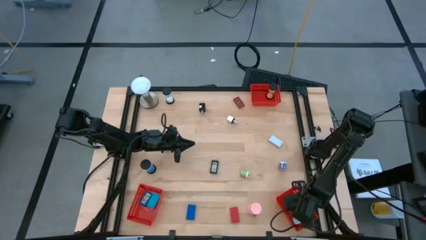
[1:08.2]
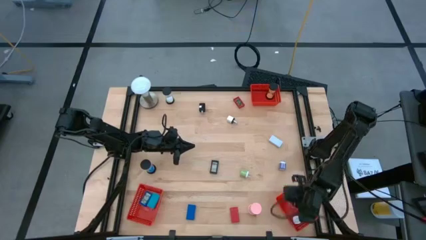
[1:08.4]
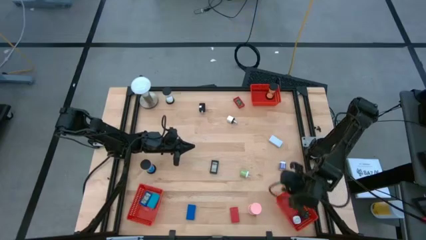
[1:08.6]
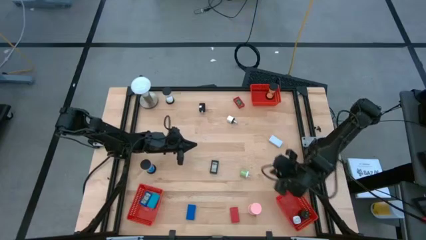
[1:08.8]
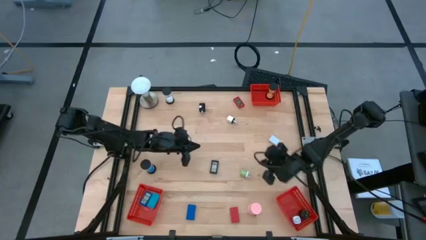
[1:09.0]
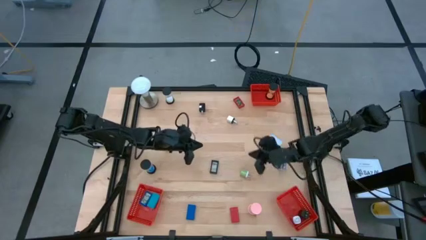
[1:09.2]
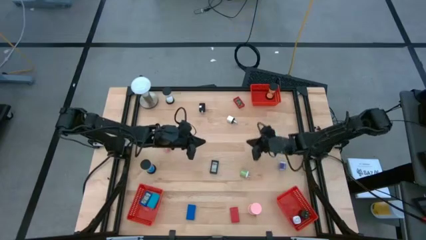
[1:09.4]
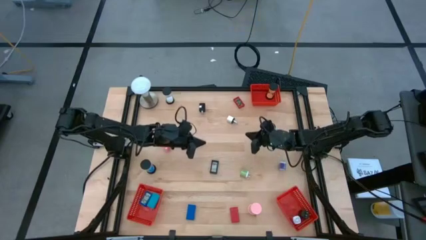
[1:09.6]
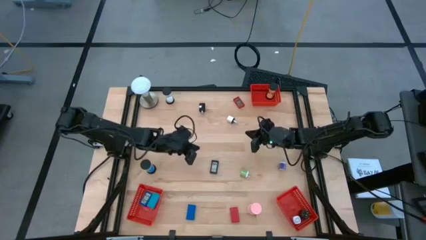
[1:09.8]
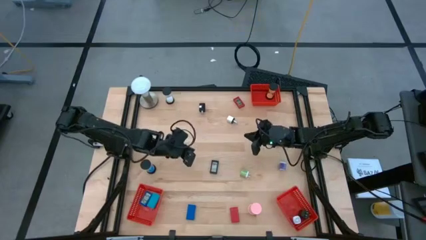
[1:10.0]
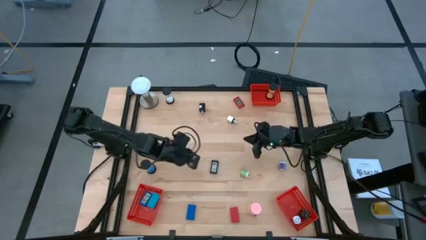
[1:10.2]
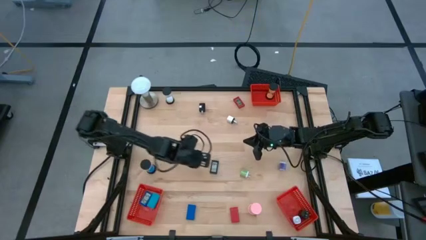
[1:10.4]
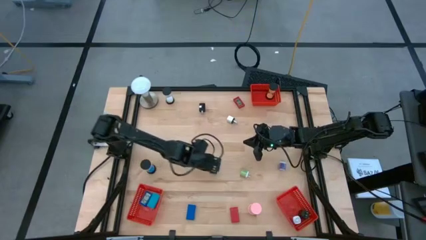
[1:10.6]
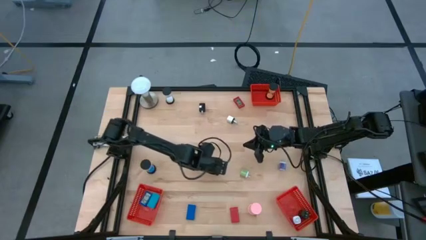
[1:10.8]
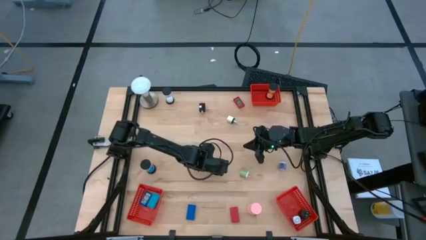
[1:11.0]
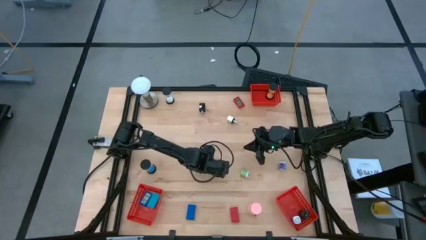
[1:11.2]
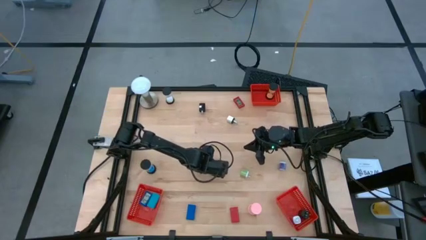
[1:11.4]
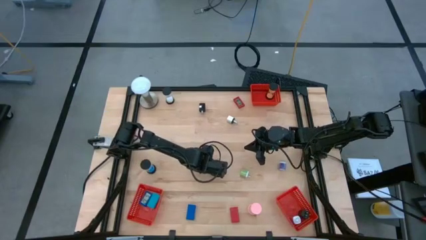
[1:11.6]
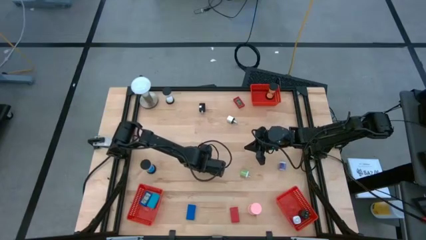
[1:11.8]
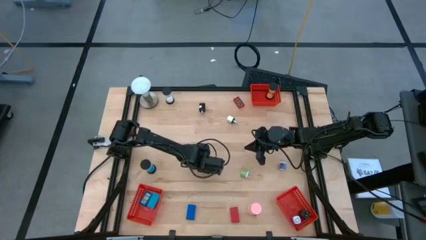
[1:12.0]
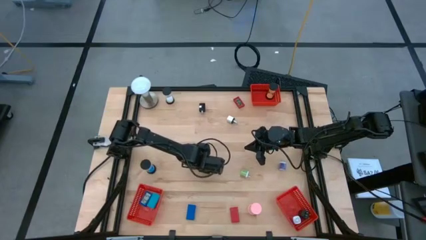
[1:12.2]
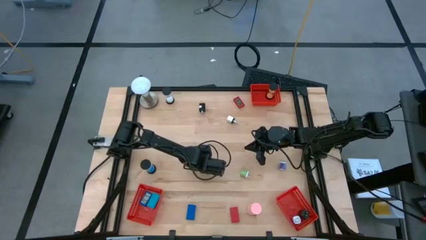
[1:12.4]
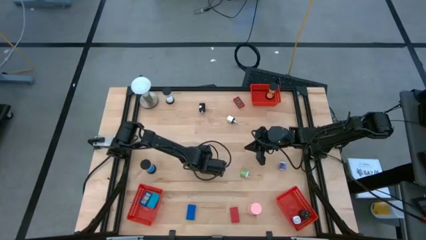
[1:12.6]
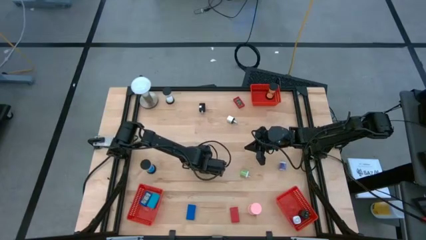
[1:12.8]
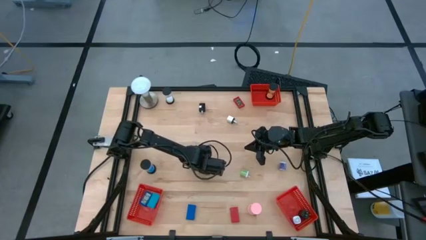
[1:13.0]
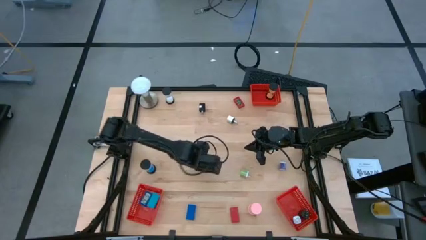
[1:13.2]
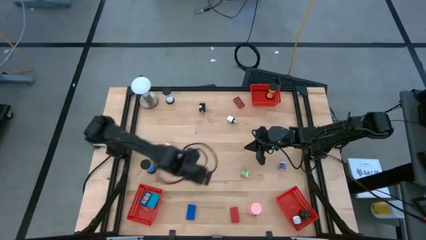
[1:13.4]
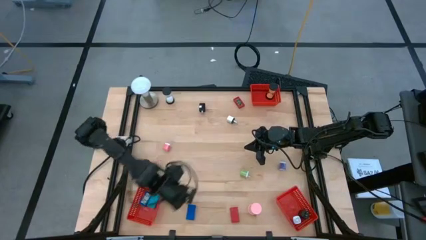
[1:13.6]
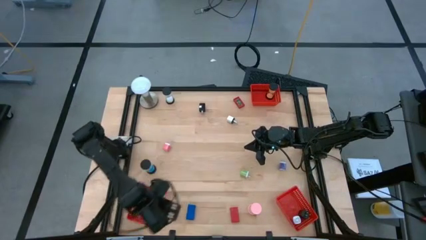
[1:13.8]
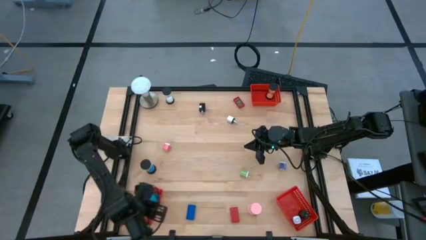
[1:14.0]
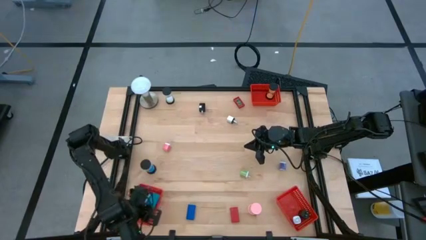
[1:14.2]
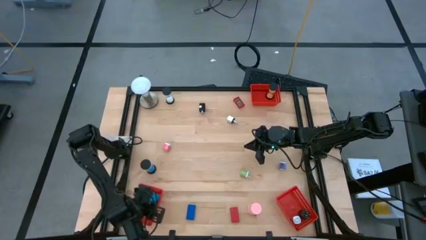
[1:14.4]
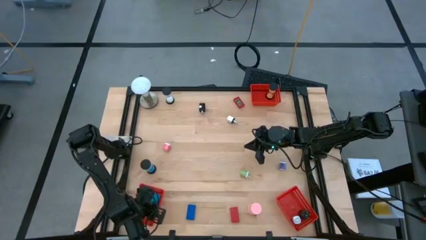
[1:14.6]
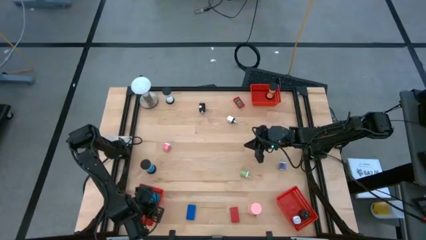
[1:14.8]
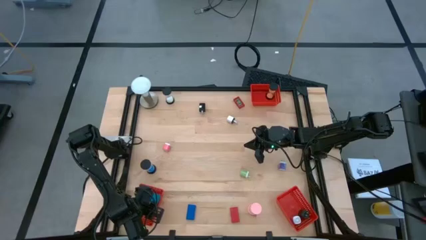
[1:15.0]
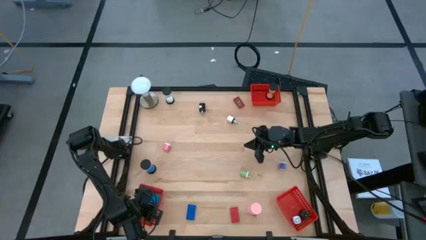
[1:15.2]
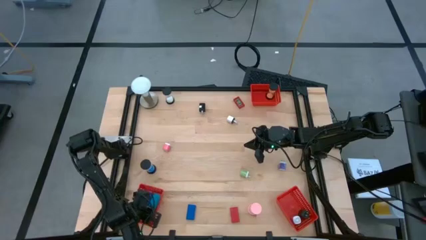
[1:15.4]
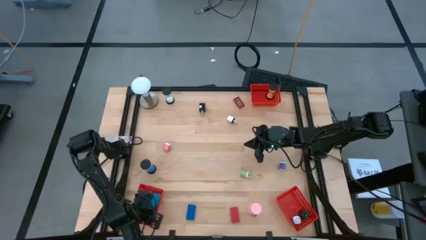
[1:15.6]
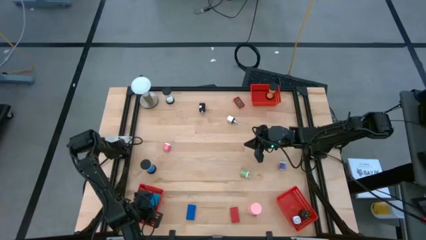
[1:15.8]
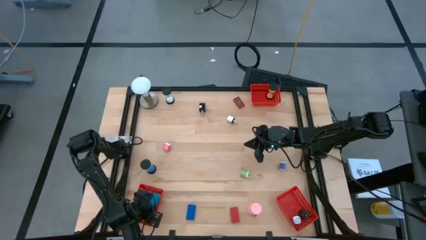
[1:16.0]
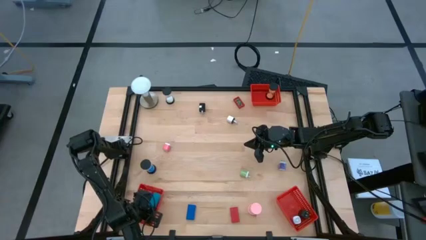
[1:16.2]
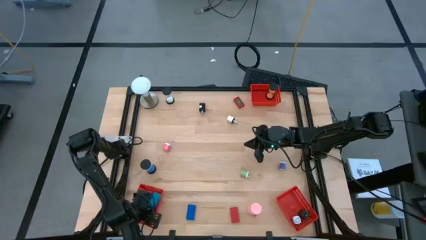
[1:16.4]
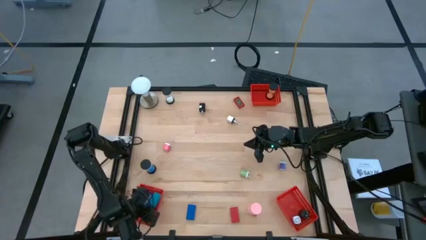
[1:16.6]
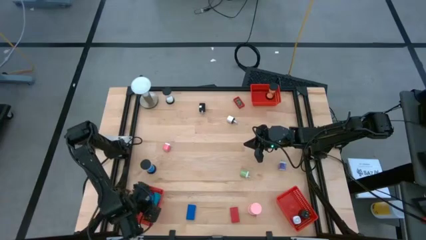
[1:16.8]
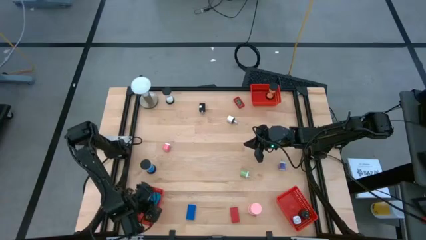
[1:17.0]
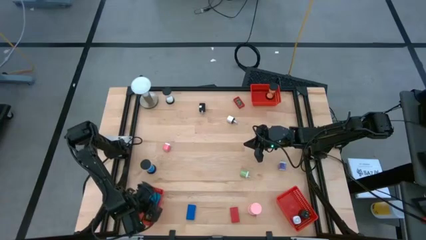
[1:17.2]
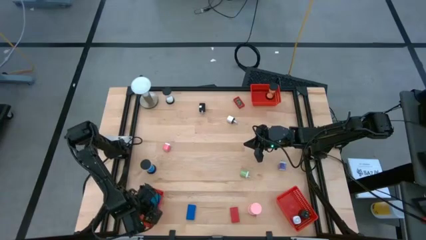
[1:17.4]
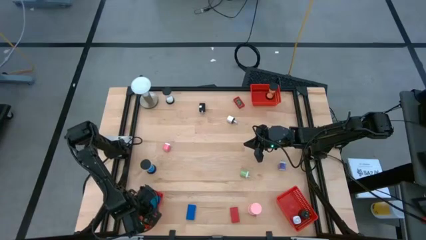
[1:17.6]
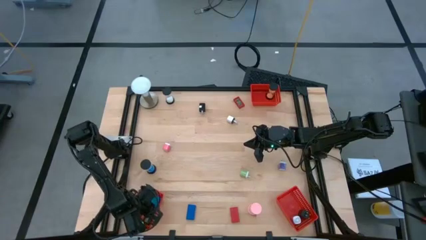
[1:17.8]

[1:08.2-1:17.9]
Task: Pick & Place Office items
Put the black digital clock into the bottom left red basket

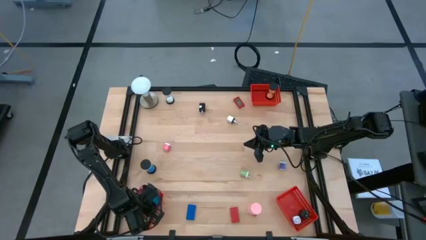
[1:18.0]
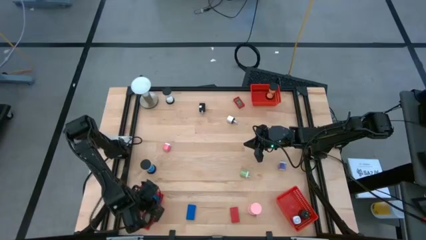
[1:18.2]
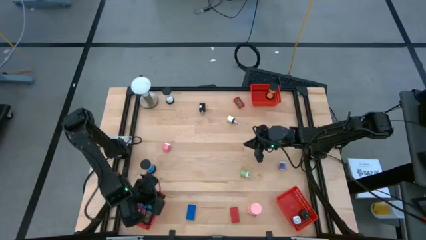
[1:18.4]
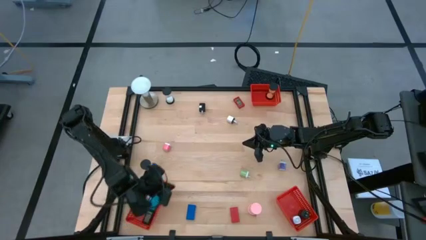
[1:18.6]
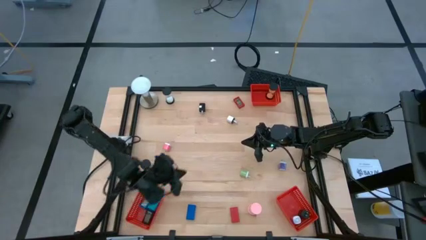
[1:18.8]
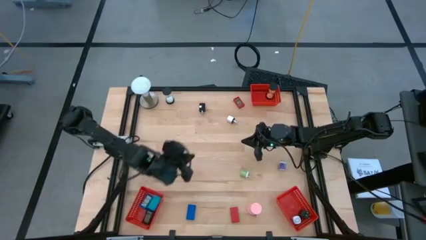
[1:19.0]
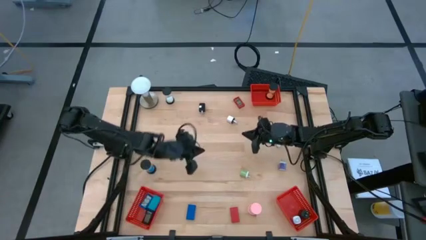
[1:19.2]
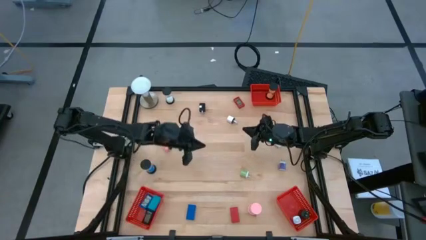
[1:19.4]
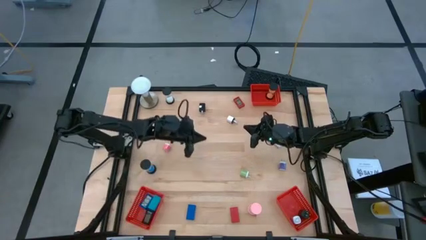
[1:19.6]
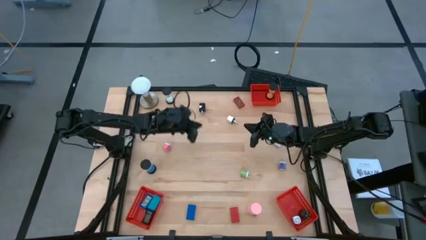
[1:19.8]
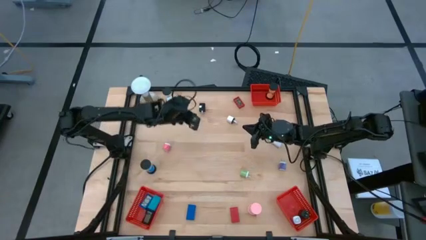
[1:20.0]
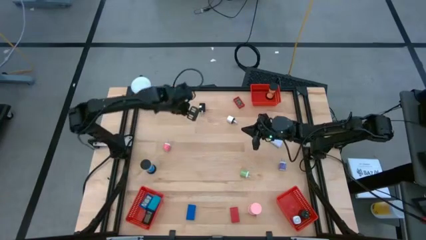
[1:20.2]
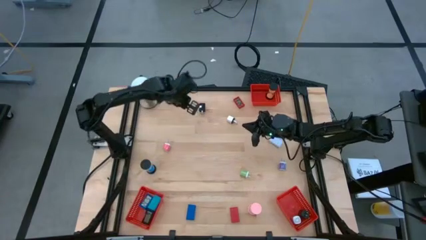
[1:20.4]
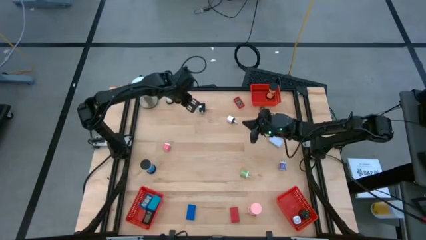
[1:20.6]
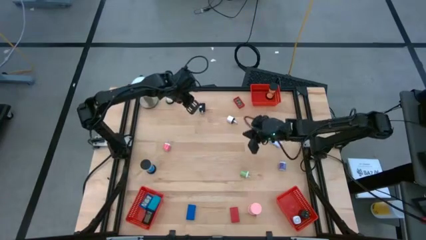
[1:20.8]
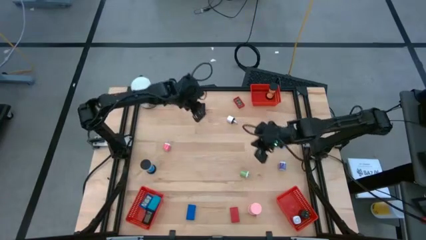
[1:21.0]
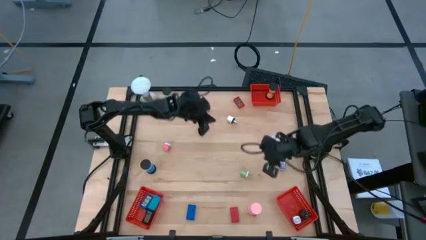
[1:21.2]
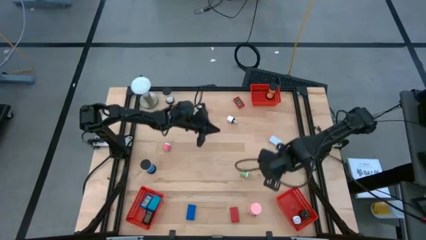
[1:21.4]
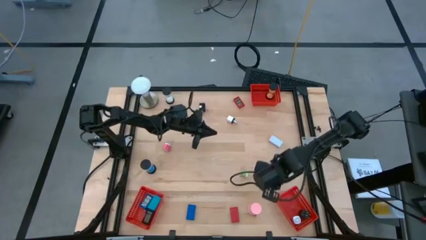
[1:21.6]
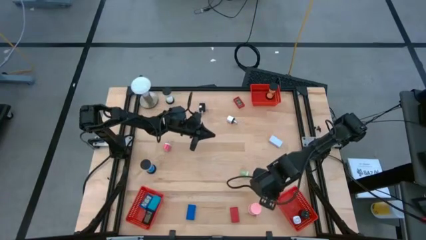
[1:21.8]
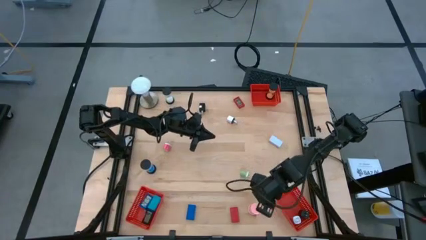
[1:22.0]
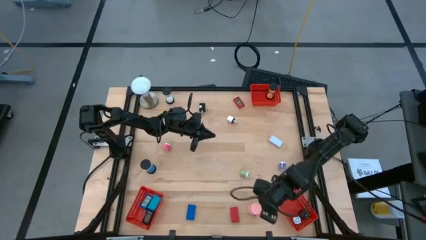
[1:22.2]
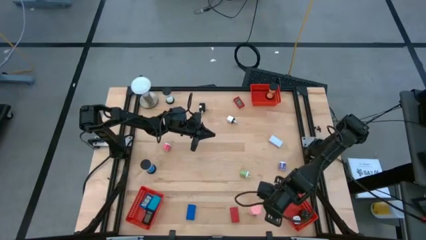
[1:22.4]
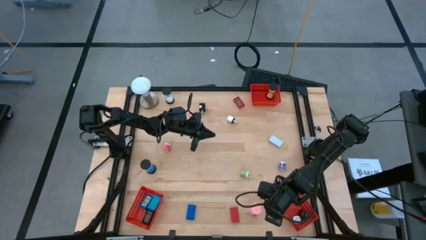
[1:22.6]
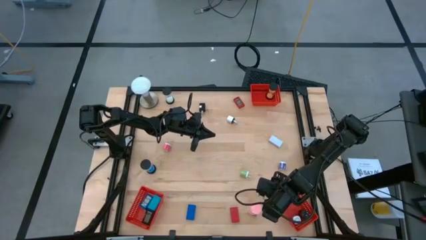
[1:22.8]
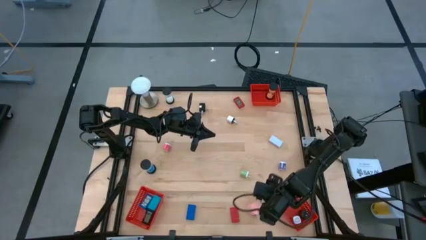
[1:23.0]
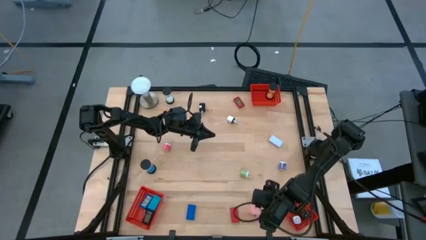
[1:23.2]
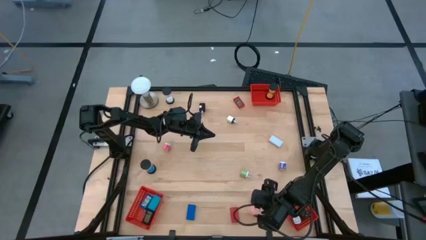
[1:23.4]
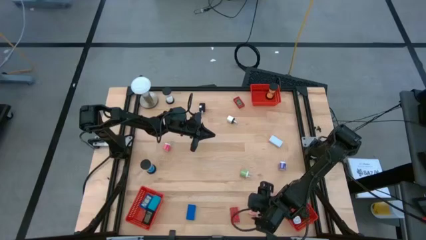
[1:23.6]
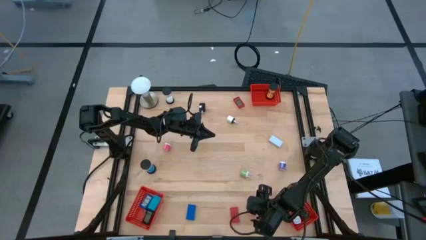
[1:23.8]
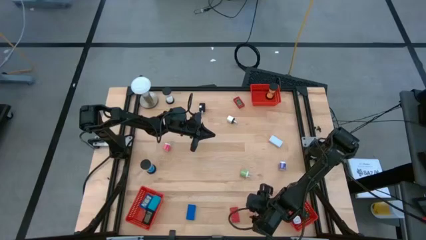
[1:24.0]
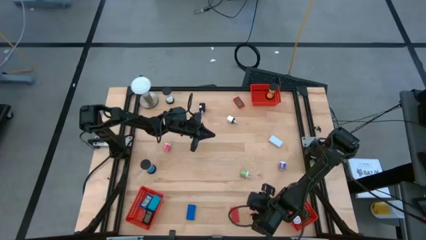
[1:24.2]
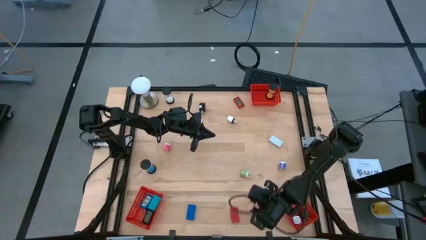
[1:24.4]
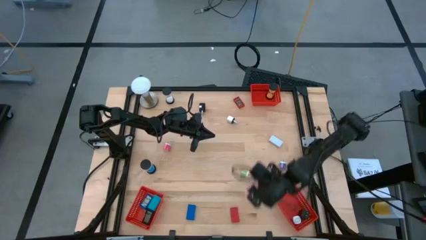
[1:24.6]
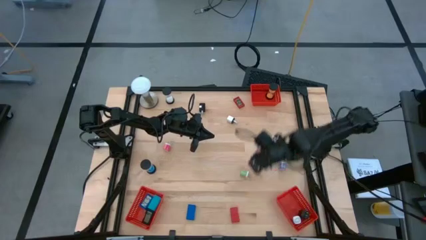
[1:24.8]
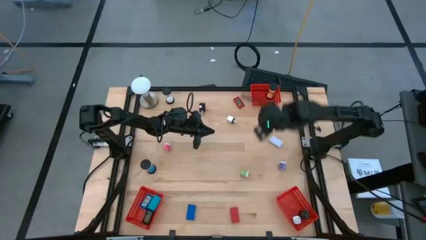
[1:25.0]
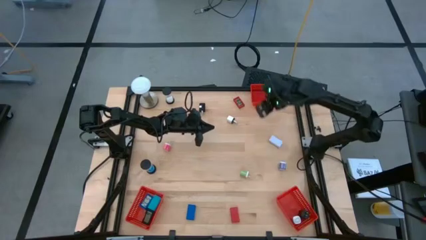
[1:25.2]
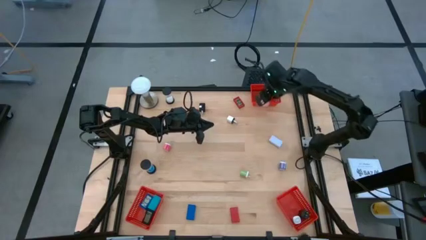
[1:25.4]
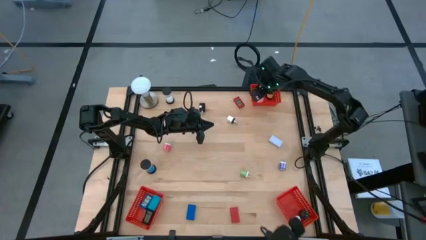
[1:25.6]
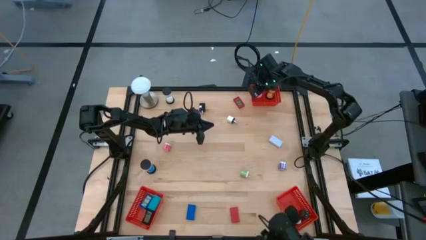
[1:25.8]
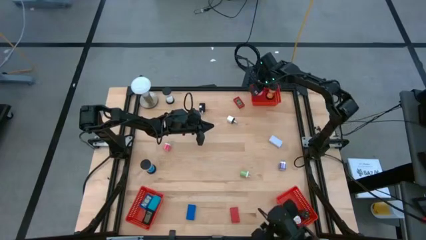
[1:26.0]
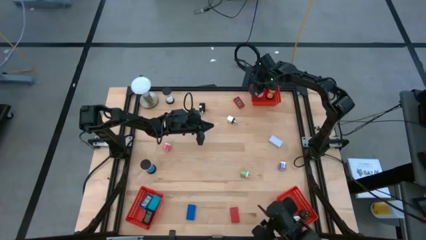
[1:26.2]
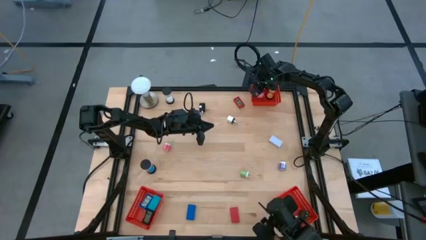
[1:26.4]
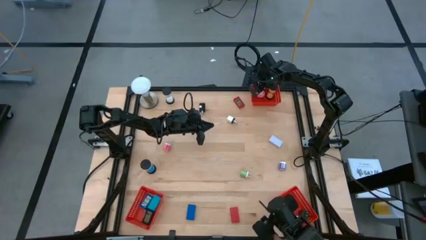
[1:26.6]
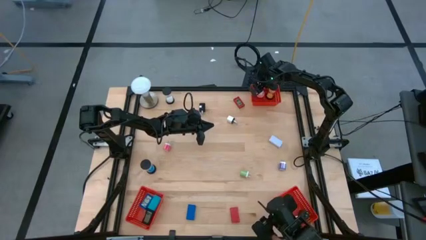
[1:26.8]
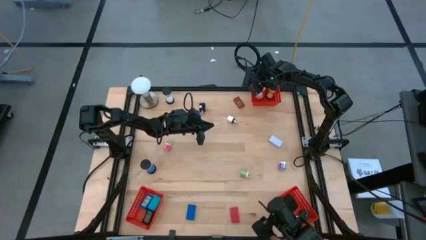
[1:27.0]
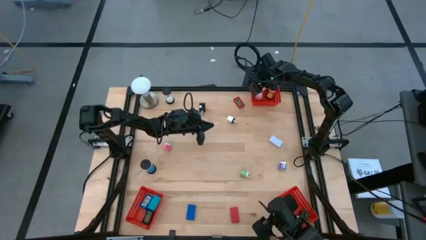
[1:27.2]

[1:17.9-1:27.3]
Put the pink hourglass into the top red basket
